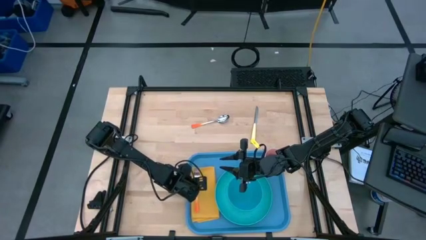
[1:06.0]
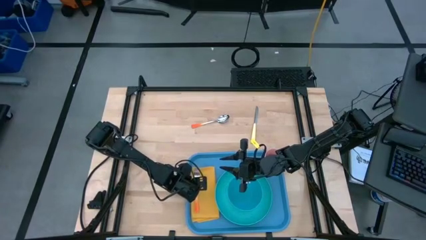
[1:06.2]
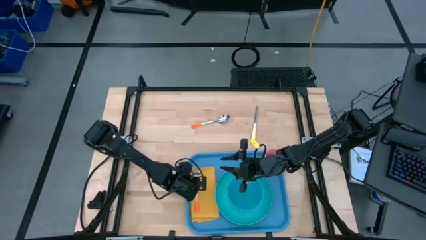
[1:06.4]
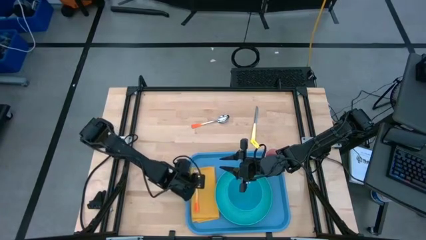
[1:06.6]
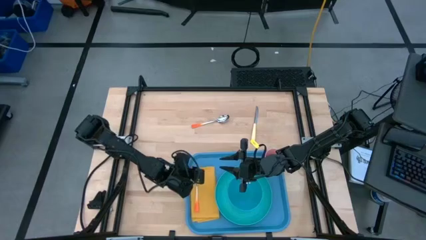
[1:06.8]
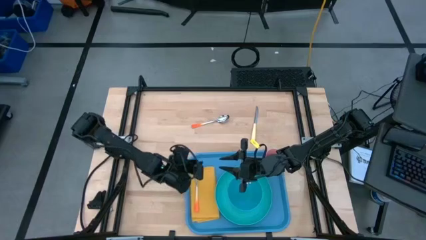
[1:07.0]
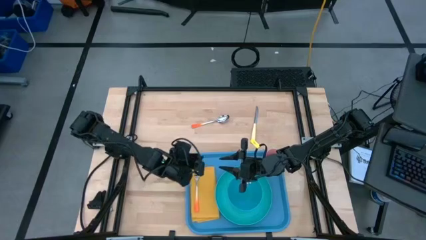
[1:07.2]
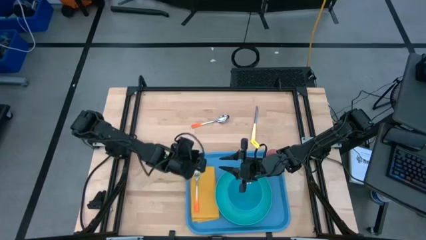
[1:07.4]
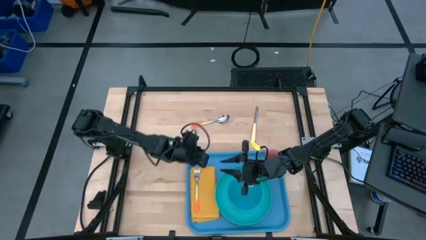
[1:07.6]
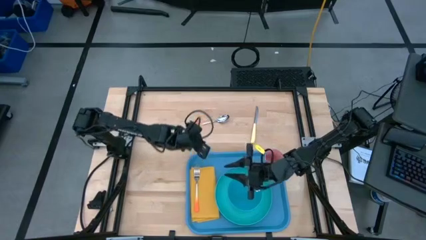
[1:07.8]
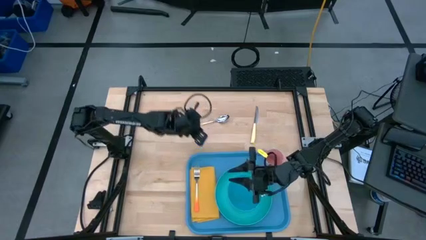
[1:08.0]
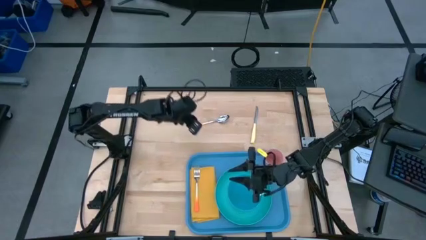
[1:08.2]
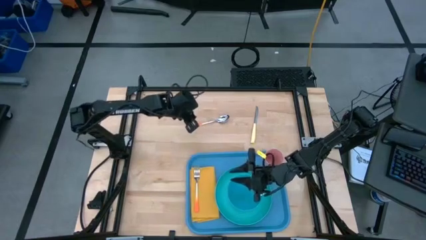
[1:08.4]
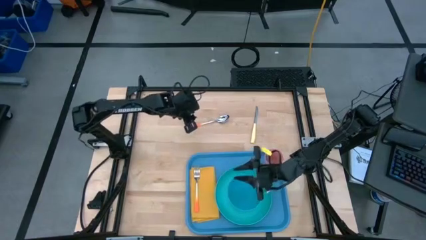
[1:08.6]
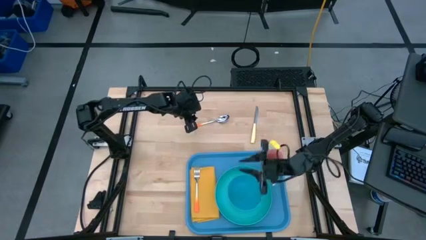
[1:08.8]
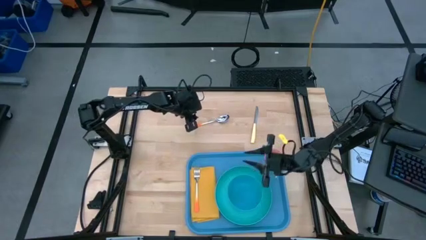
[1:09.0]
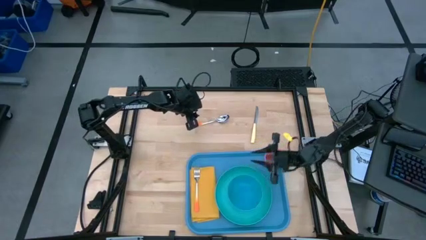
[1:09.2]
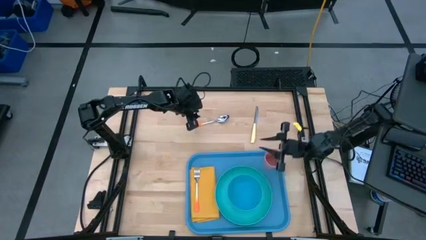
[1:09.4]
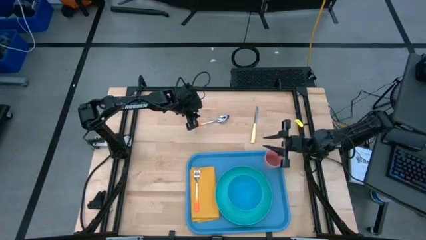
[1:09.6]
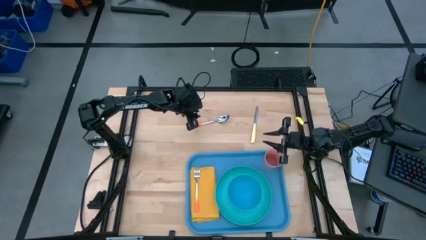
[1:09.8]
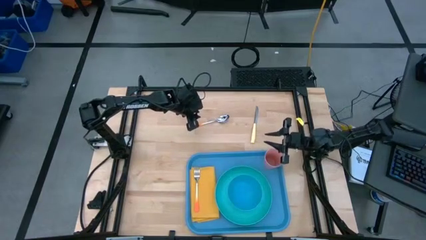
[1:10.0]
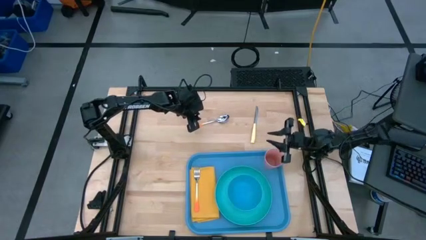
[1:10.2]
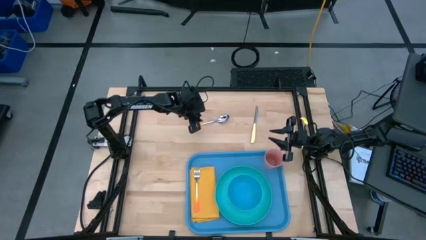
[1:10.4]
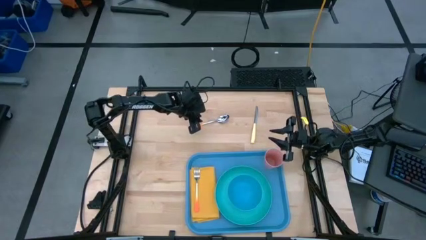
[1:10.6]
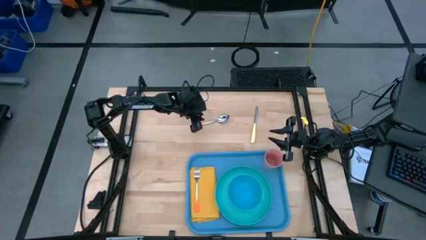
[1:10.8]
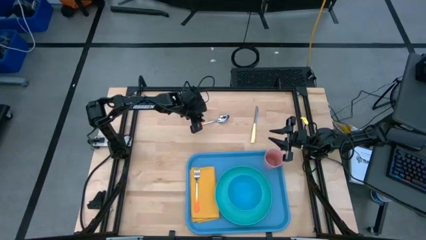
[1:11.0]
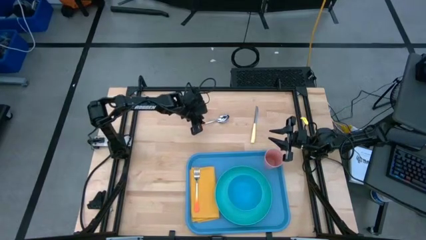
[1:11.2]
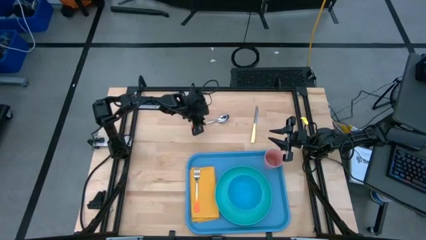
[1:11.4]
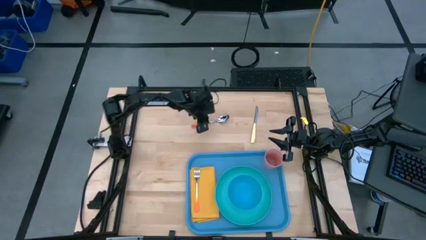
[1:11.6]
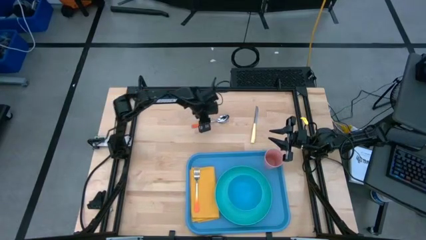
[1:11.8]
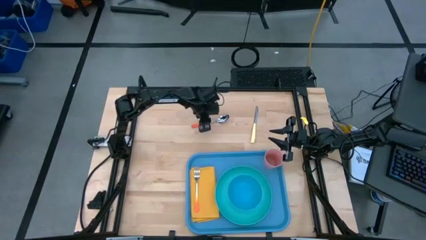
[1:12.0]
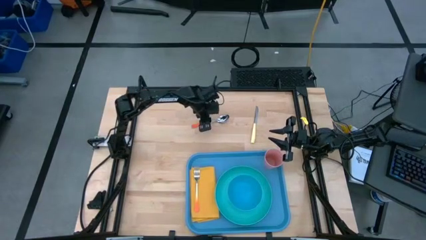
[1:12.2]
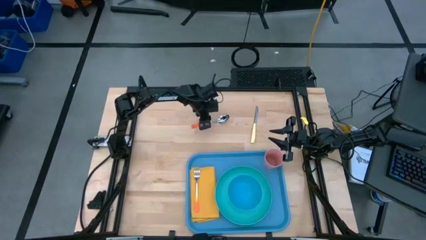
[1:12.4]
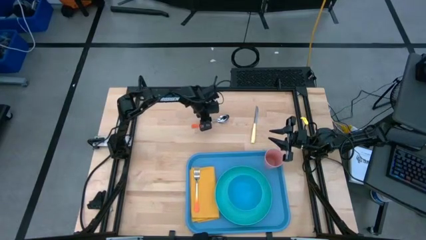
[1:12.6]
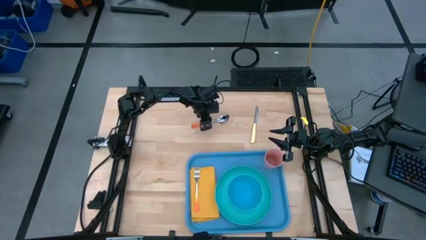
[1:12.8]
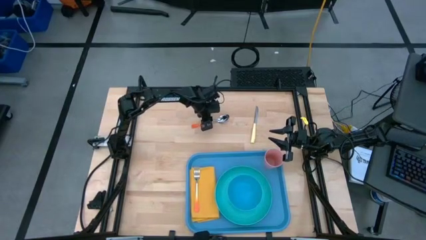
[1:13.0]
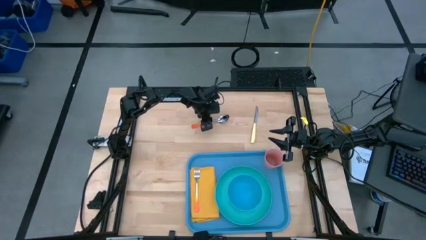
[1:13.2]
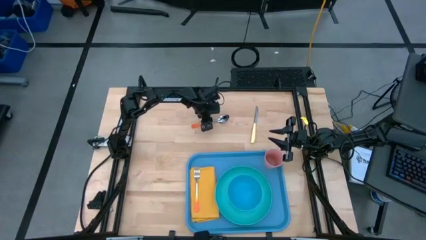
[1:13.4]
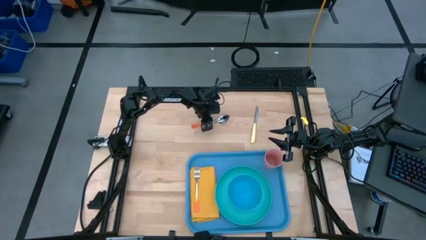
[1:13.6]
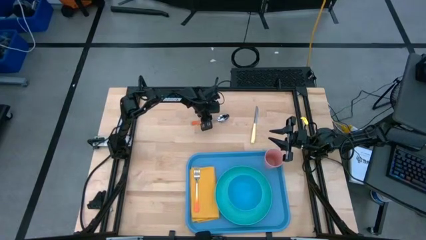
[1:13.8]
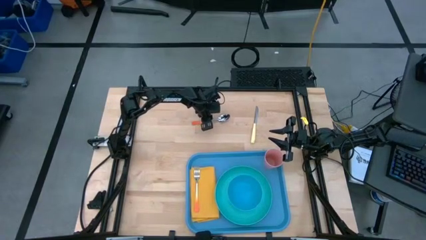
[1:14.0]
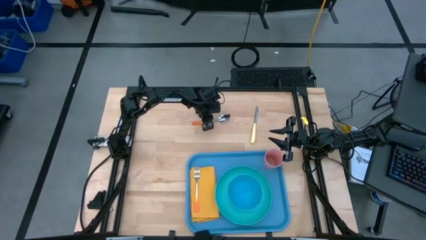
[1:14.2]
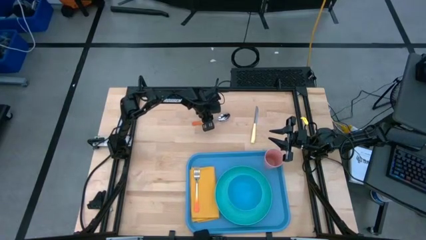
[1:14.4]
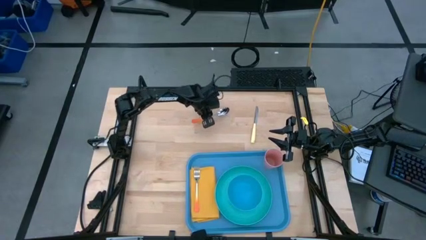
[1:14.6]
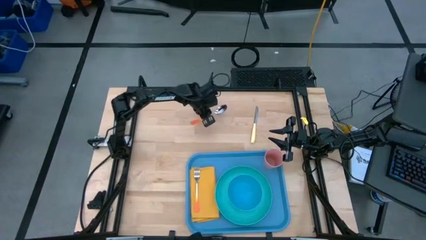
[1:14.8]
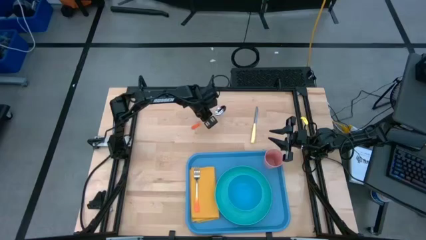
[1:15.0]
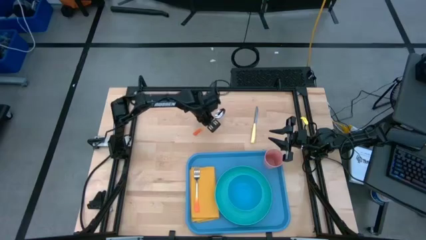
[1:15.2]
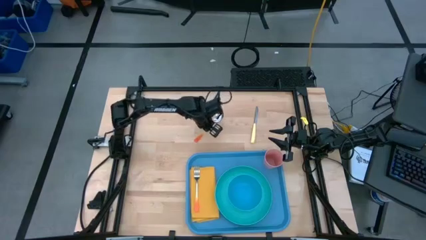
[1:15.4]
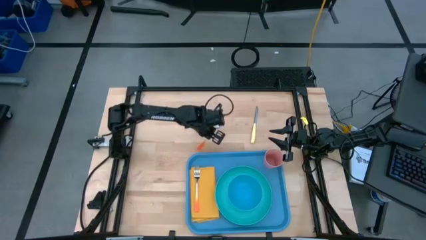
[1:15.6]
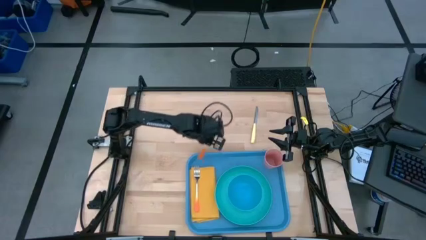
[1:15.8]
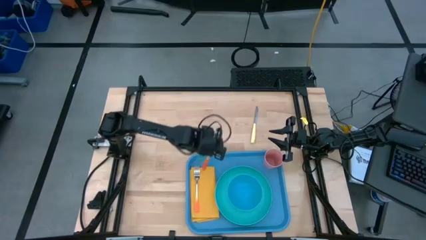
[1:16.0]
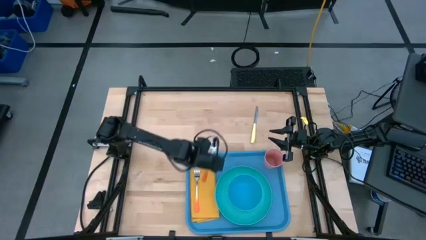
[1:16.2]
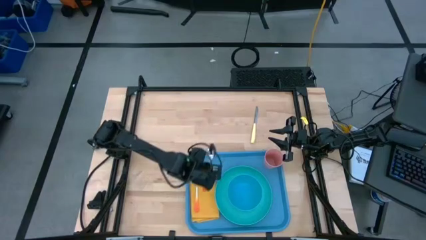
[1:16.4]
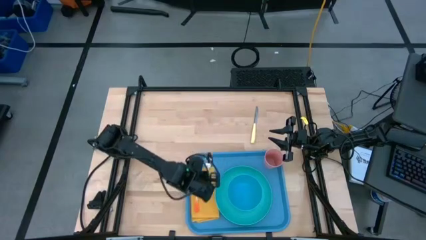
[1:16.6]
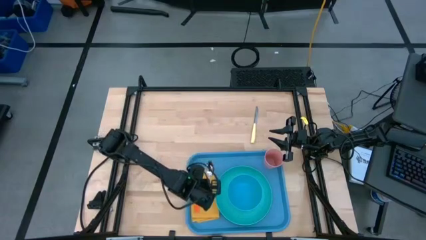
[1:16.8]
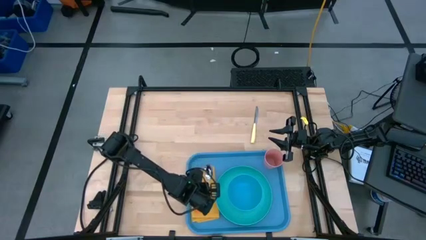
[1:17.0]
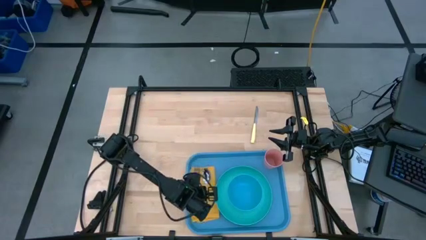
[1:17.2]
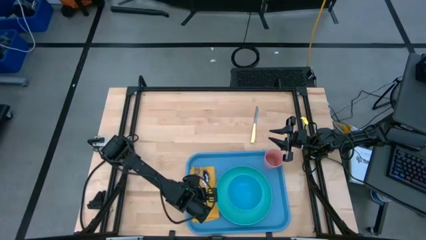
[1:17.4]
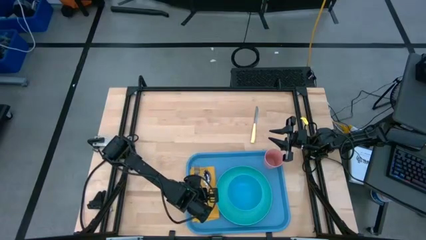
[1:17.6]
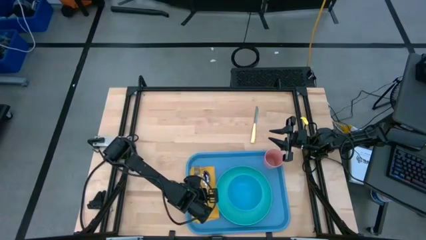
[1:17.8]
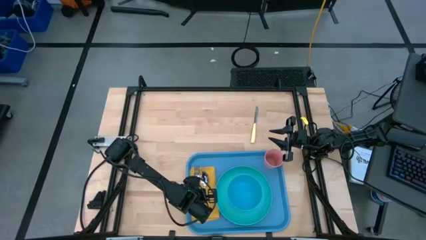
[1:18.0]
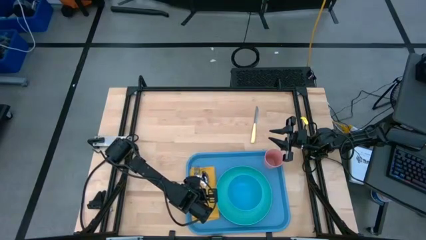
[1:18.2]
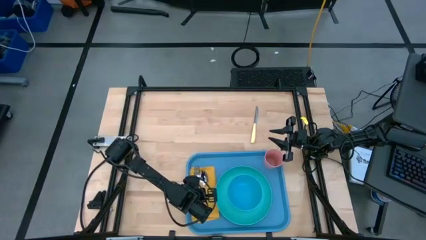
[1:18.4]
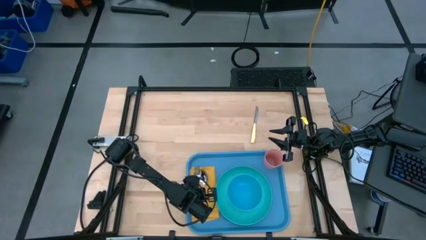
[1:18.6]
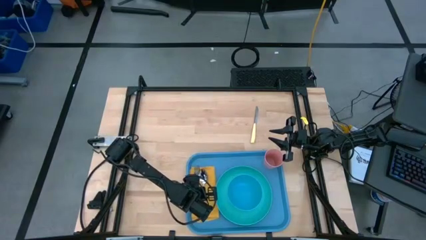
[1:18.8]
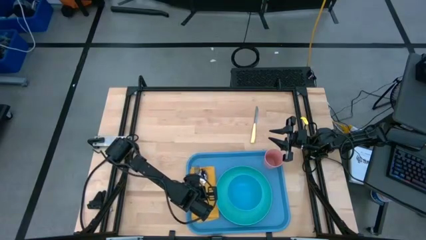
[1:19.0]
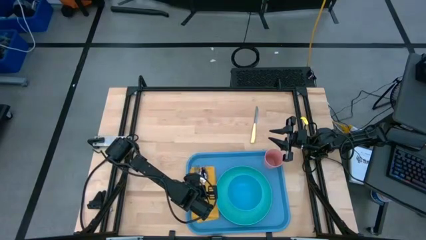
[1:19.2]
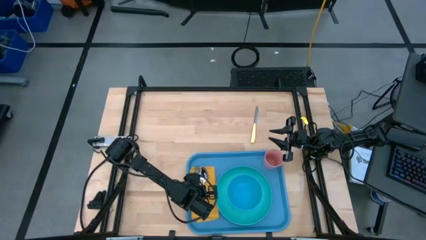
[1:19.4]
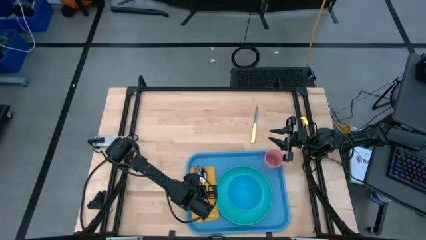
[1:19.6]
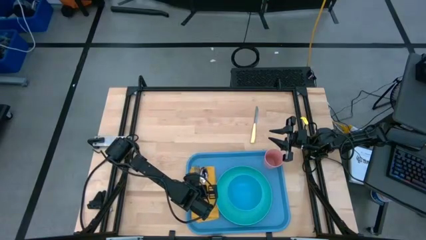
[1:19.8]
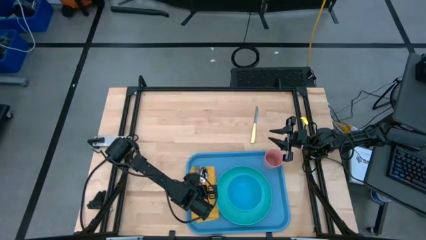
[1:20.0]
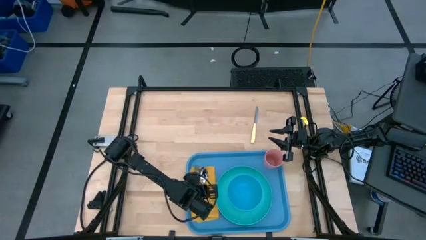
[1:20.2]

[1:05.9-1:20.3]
Task: Set up tray
Put the orange spoon on the orange table napkin to the right of the orange fork

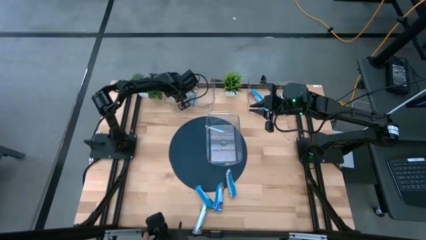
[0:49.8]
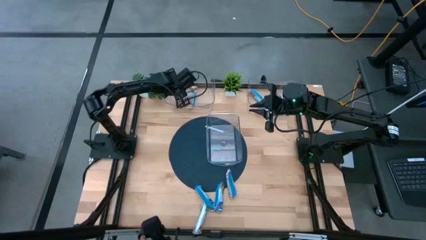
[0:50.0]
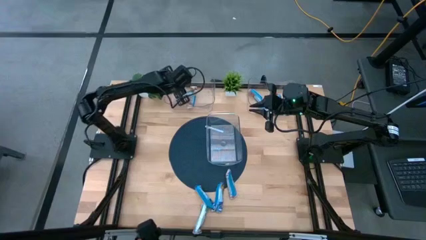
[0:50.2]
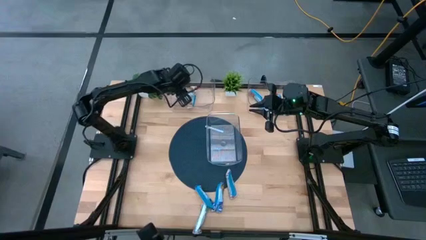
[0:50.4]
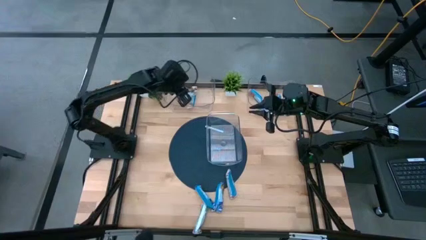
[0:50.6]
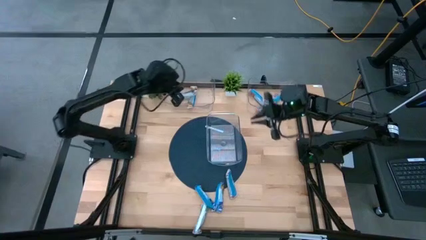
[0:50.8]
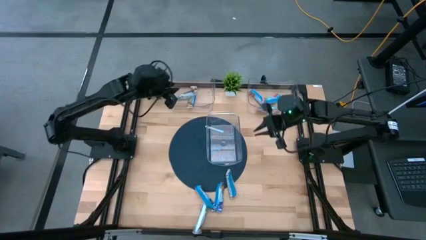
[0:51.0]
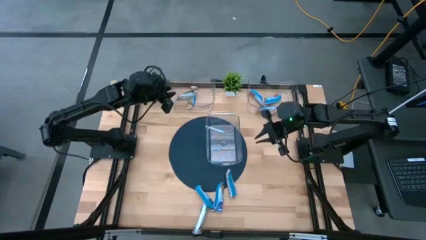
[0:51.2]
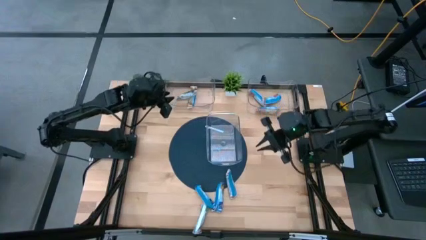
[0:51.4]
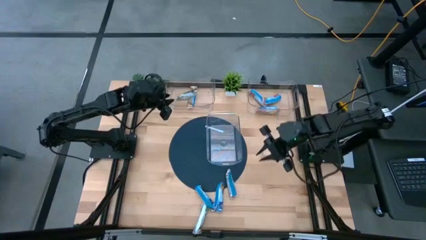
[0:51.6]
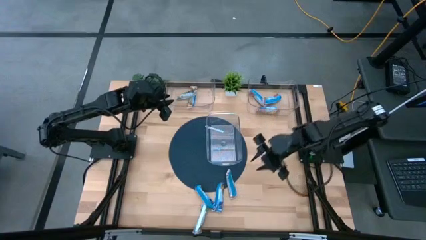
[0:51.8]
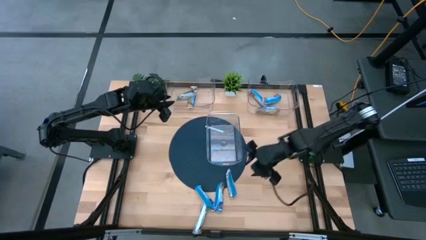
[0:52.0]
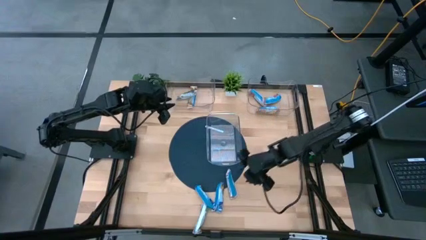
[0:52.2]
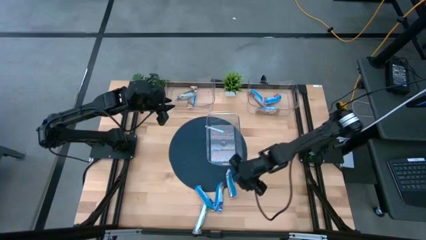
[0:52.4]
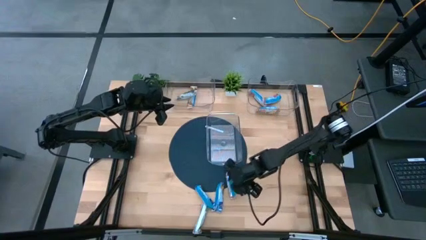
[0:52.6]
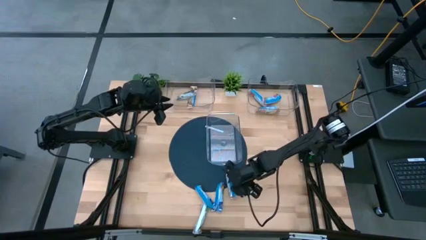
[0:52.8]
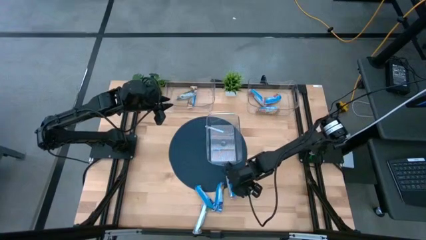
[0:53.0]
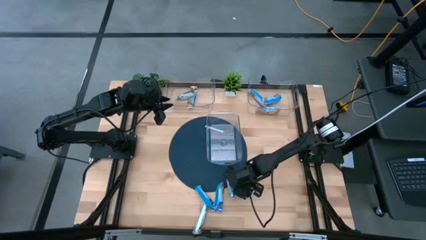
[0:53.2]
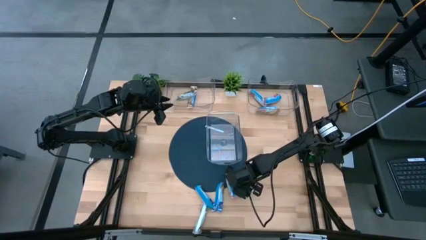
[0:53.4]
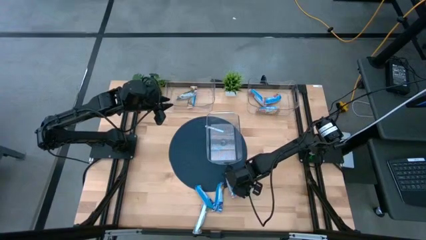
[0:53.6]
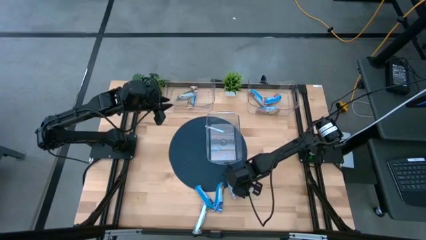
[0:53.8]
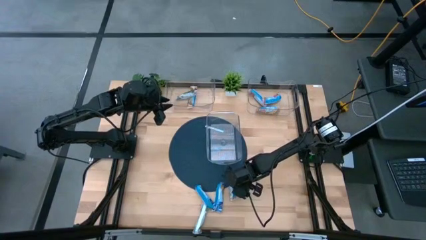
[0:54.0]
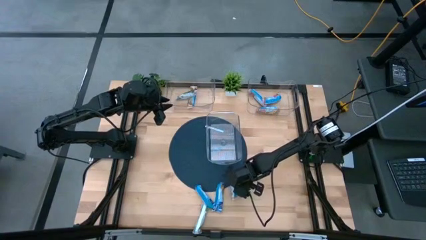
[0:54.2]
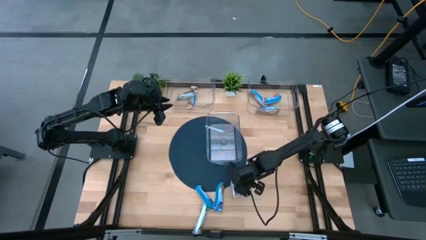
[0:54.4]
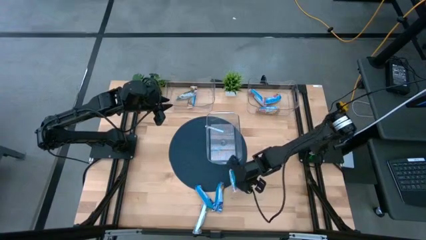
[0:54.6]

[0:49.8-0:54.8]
Task: Pick and place Granola Bars by type
Put the red granola bar into the top right transparent bin
